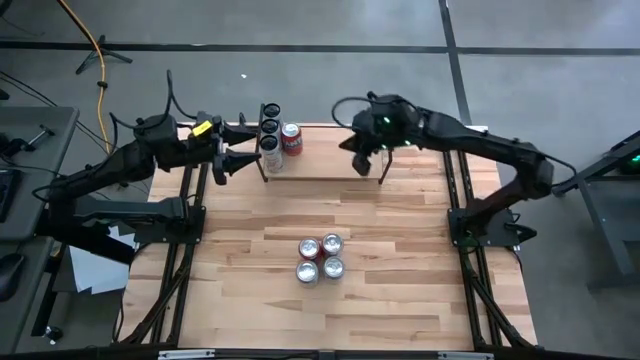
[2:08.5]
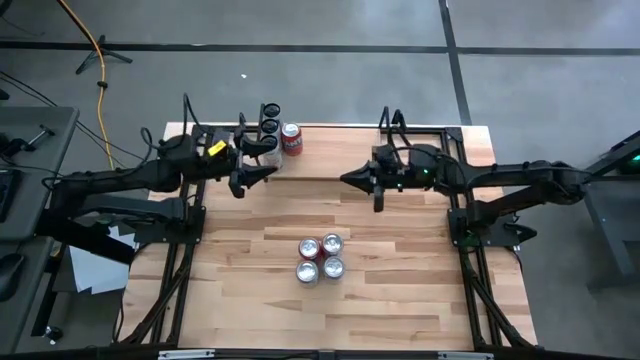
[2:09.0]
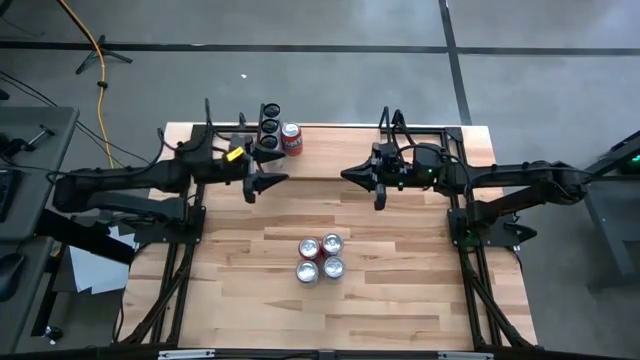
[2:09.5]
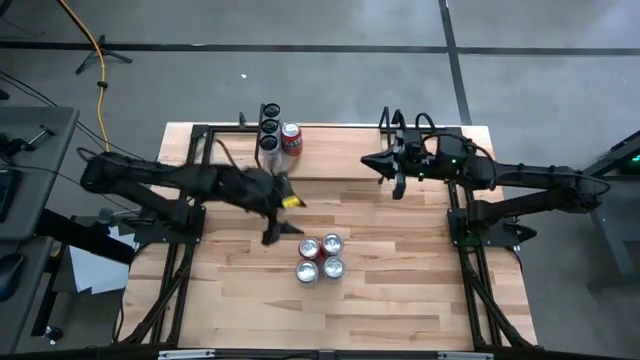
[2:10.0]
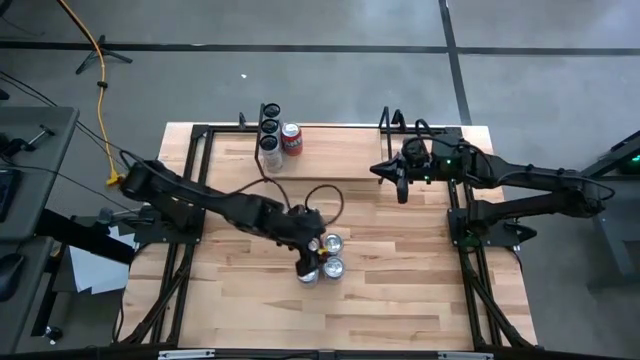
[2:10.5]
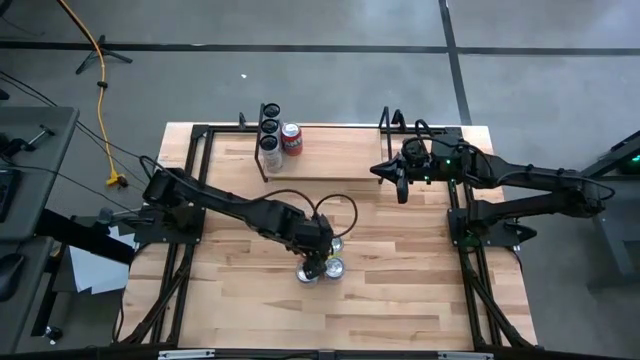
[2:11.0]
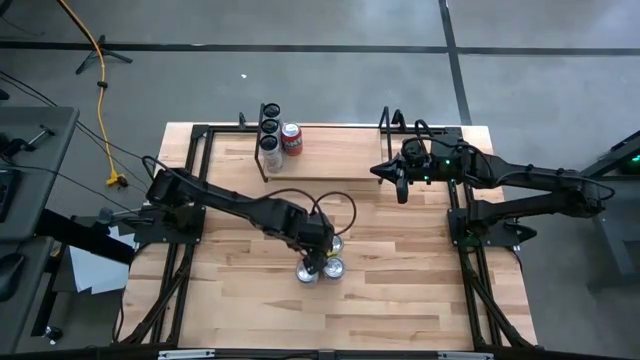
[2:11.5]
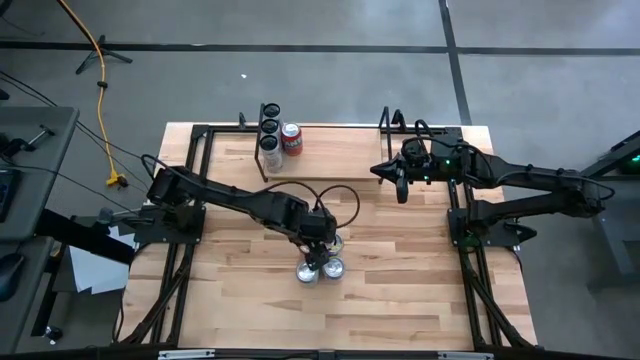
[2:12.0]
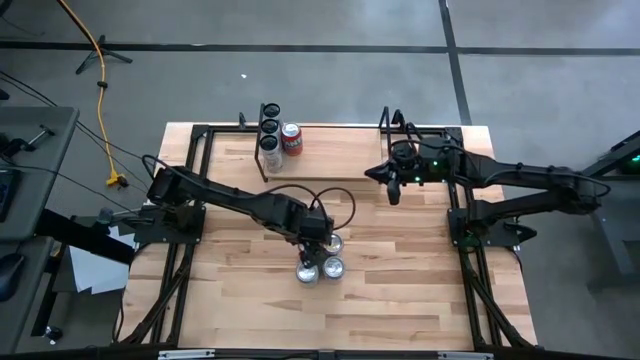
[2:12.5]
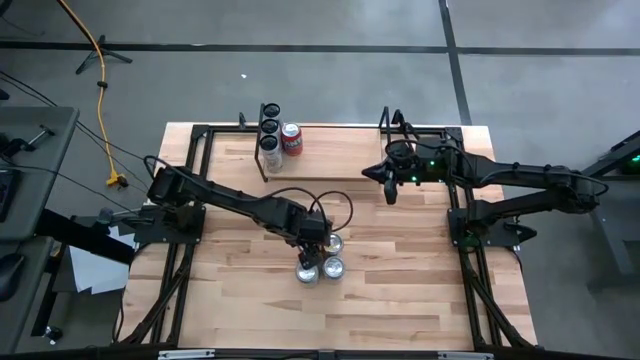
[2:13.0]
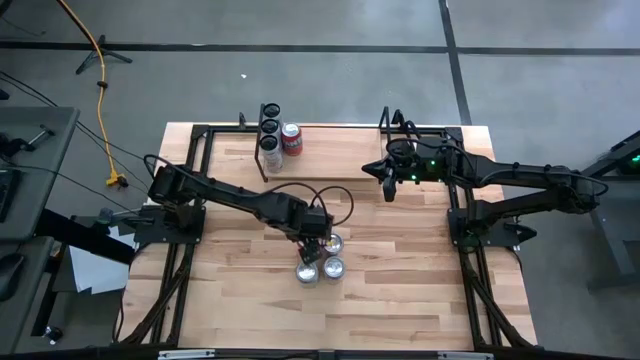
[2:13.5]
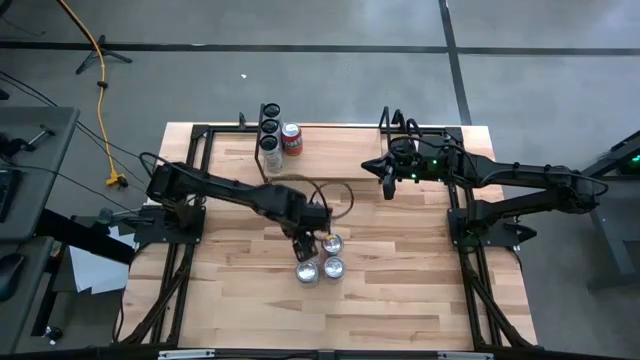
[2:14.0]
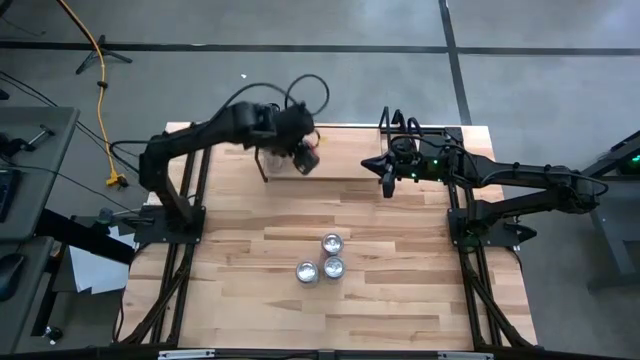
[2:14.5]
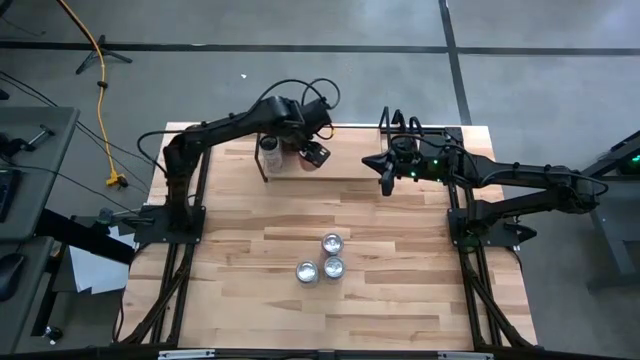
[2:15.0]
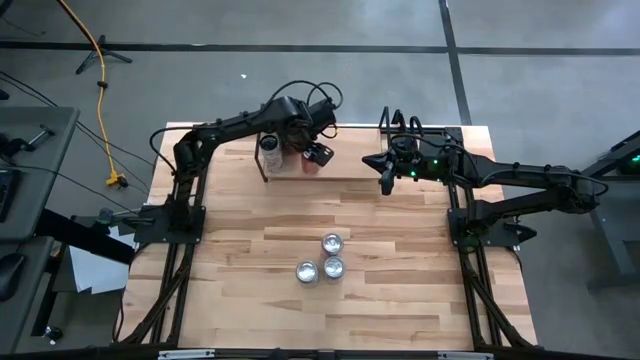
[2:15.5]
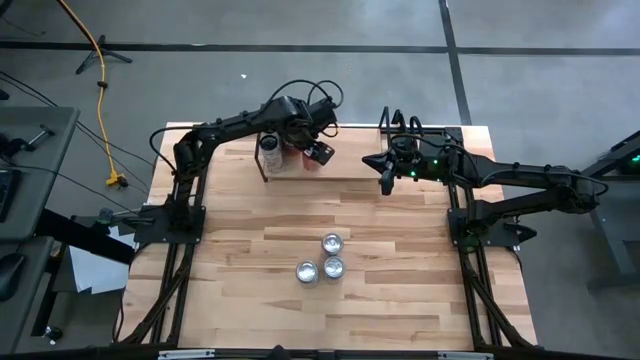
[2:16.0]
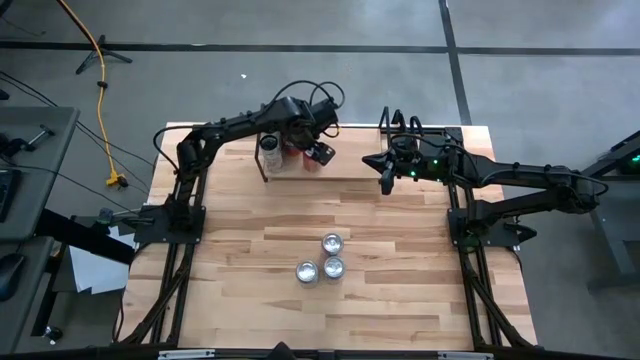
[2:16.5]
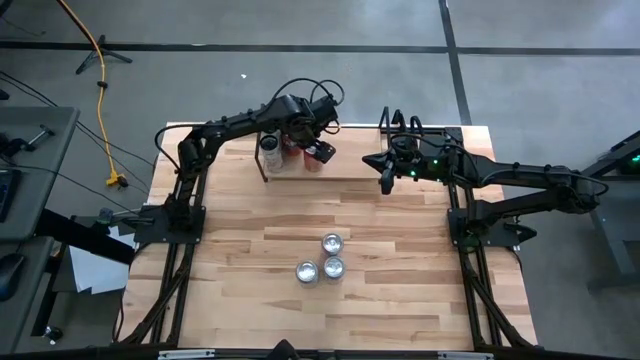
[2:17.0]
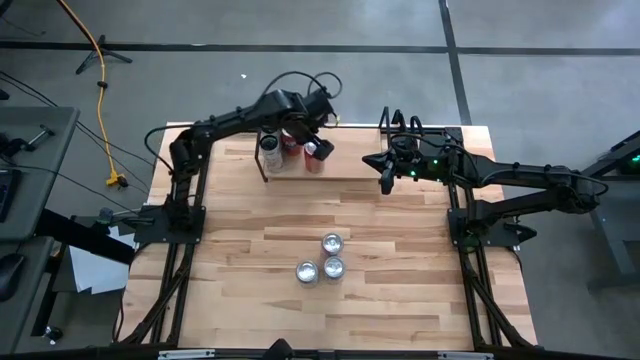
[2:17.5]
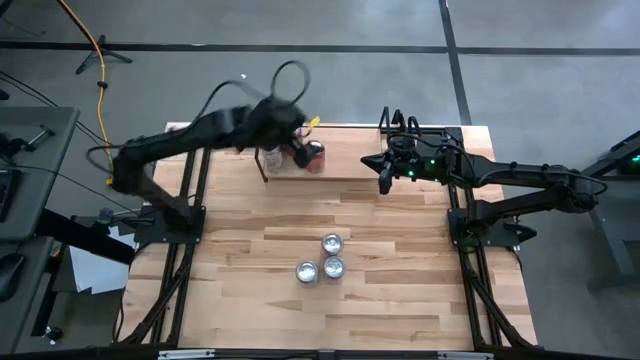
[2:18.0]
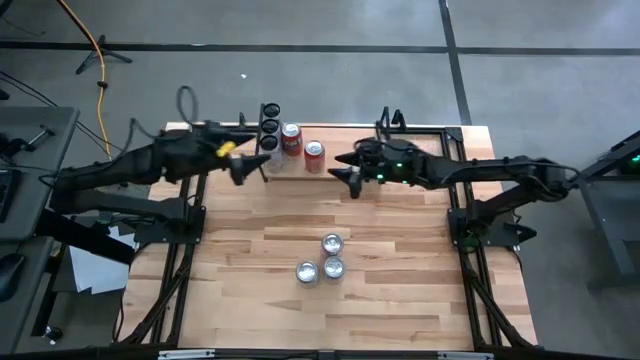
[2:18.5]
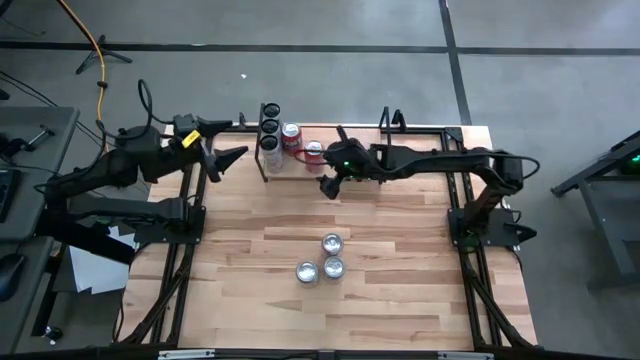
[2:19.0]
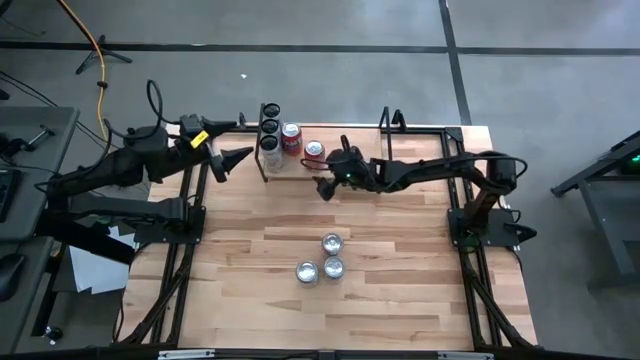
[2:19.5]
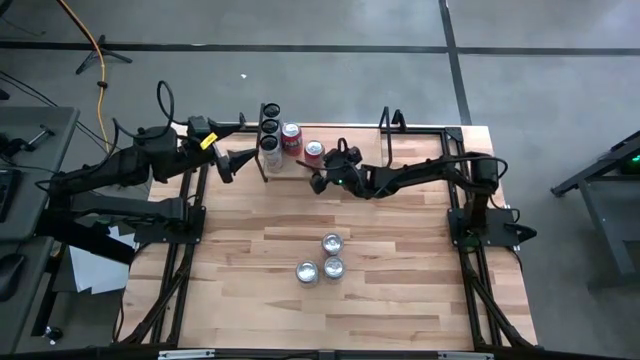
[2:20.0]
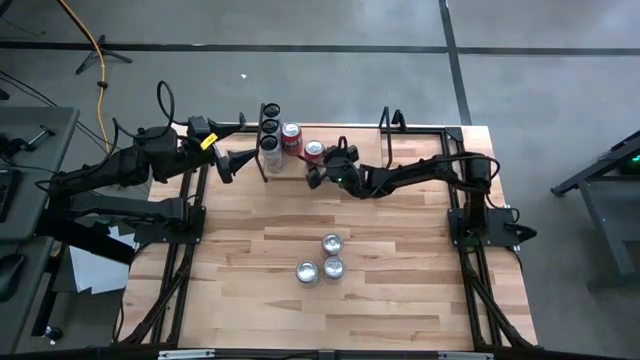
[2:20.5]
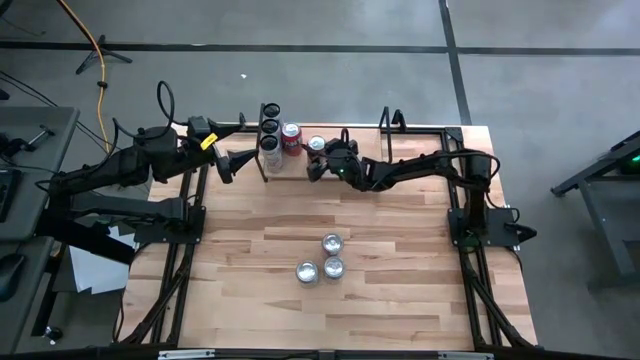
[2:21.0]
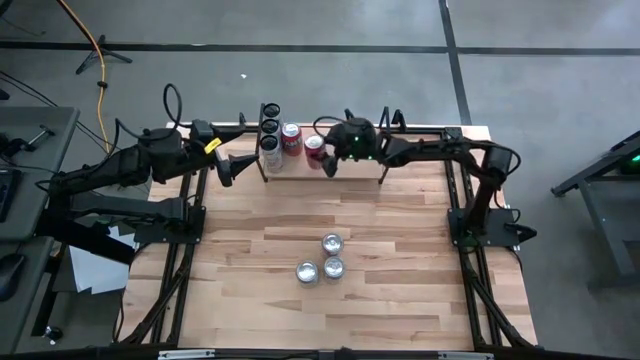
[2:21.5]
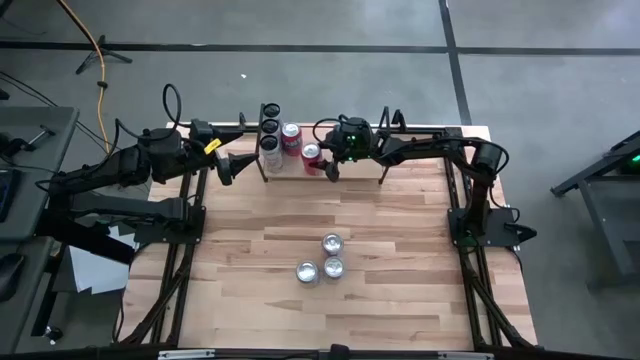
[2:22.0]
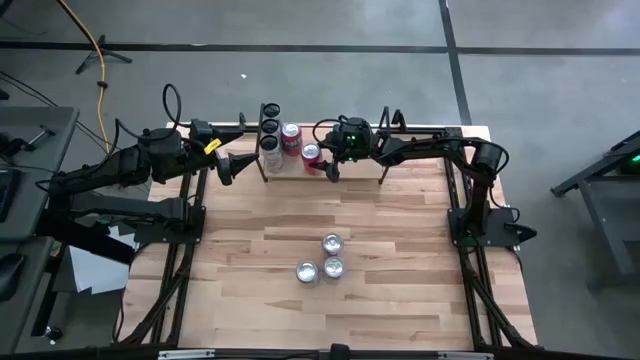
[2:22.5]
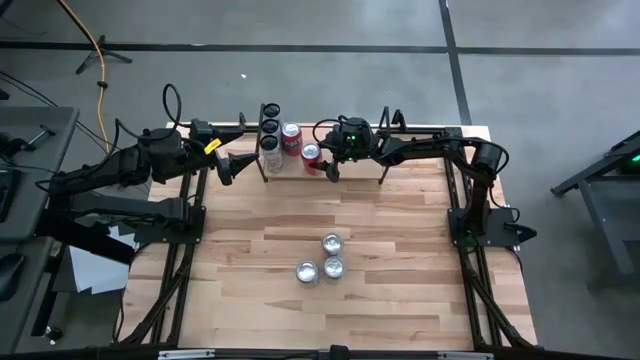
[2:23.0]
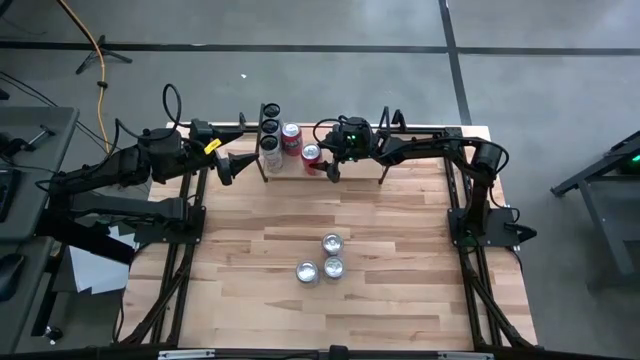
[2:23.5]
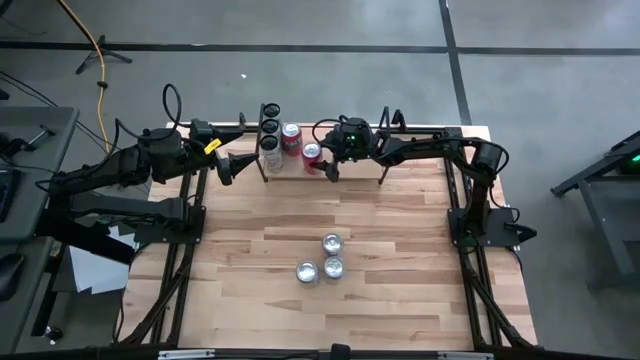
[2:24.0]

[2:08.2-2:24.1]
Task: Place canned beverage on shelf
Put the orange soda can aligned with the other orange soda can on the shelf

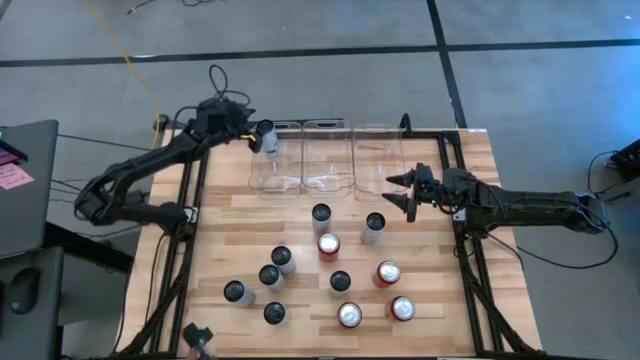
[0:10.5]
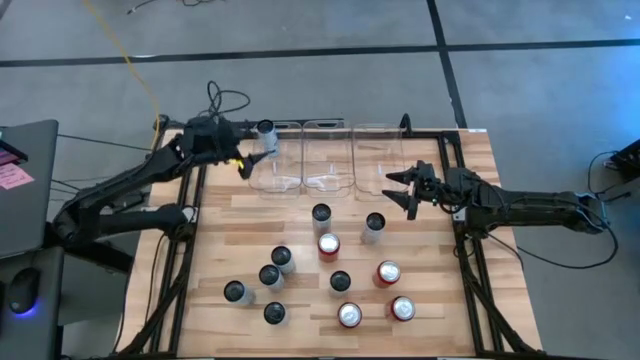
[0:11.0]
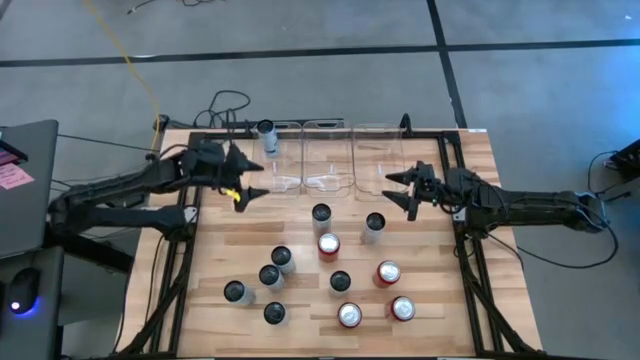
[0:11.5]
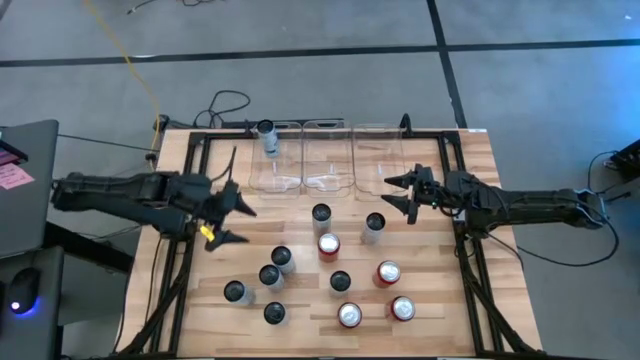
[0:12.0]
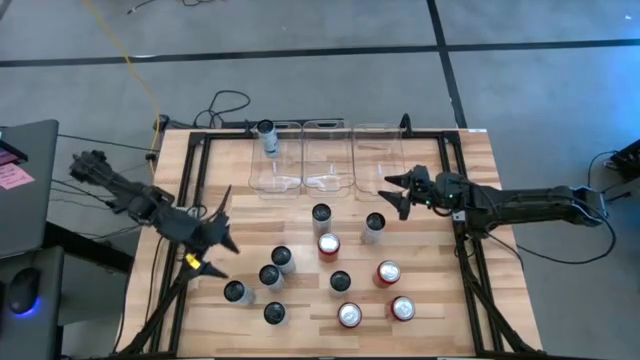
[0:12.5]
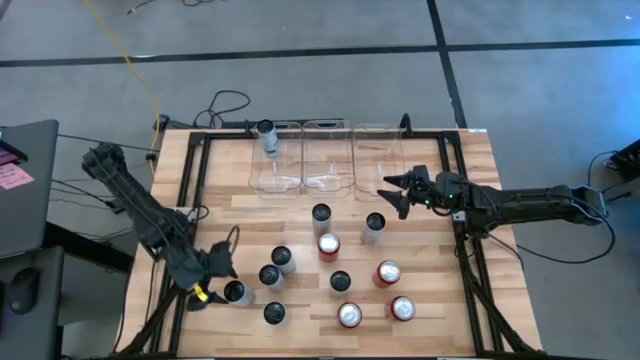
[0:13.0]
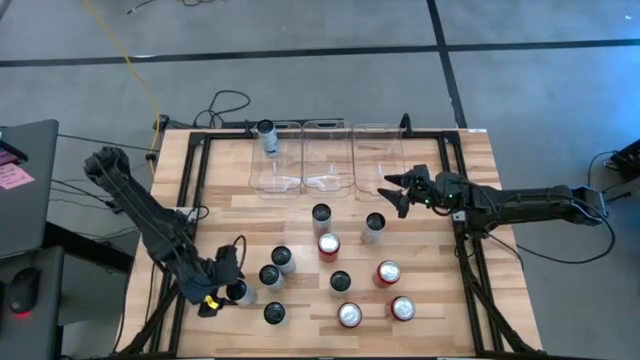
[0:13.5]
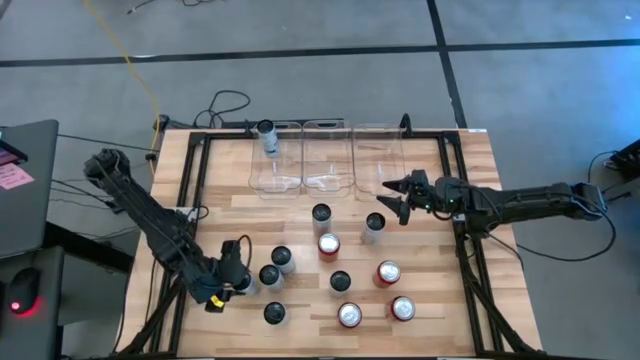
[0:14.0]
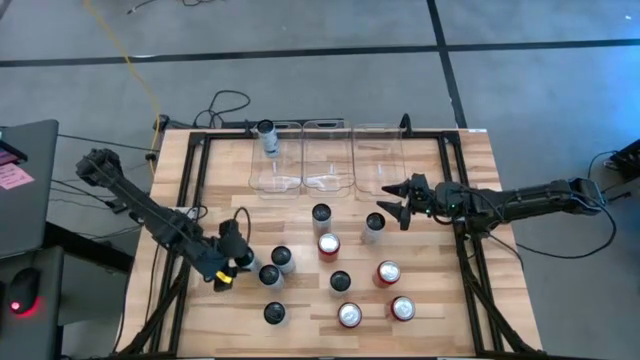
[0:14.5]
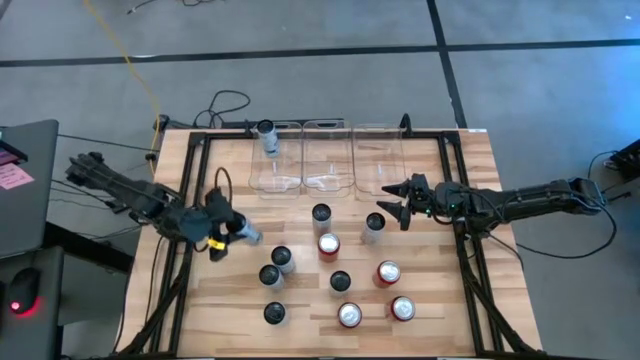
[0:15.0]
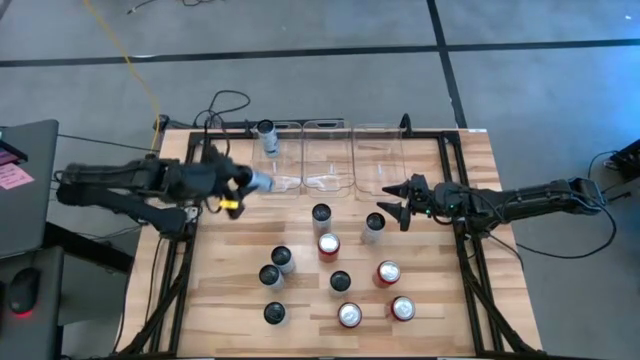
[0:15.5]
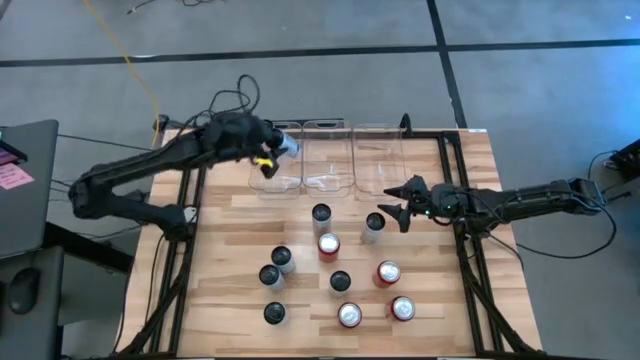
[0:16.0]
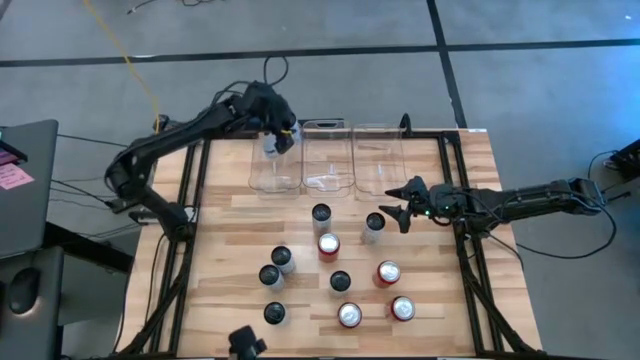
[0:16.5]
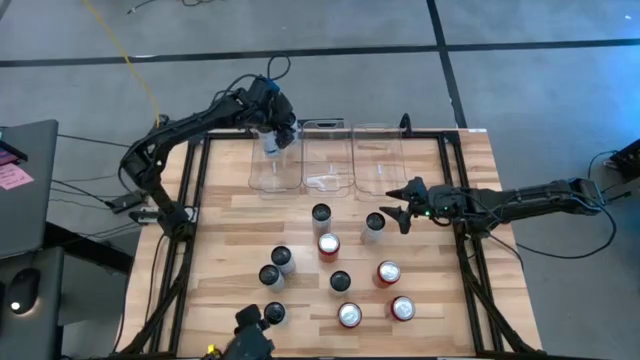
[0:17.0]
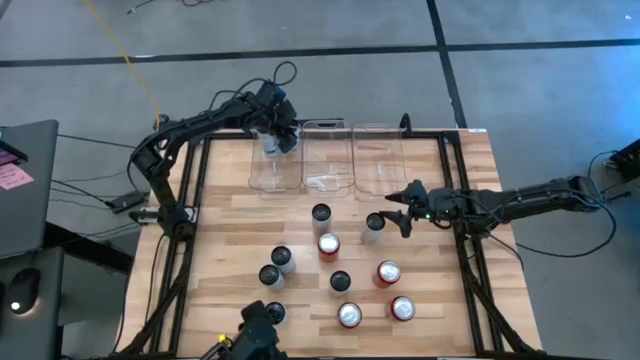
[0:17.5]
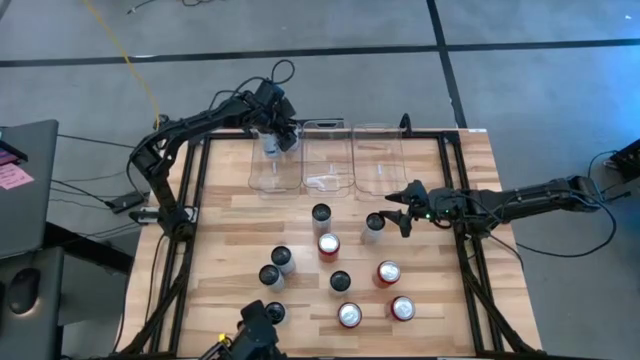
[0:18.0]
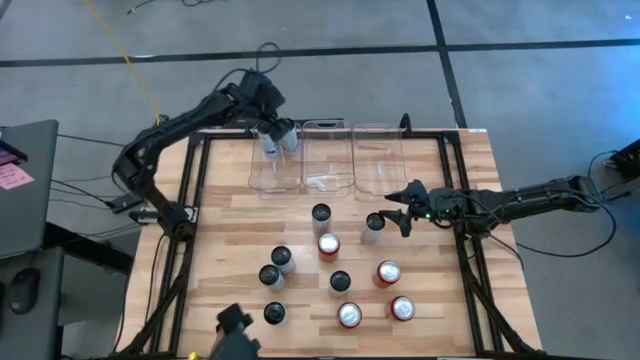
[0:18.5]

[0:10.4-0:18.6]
Task: Sort soda cans
Put the white-blue soda can into the left transparent bin
